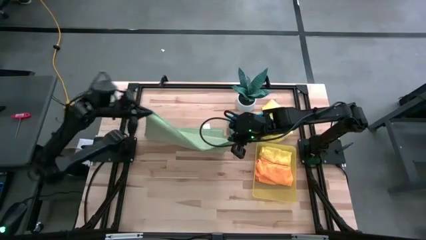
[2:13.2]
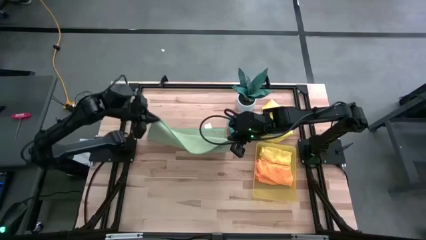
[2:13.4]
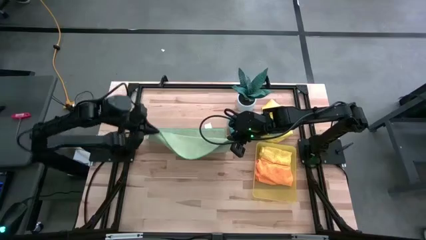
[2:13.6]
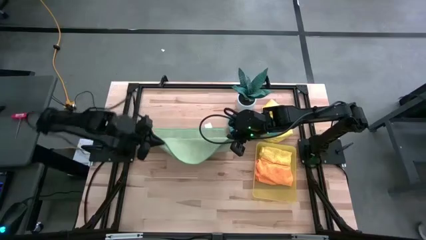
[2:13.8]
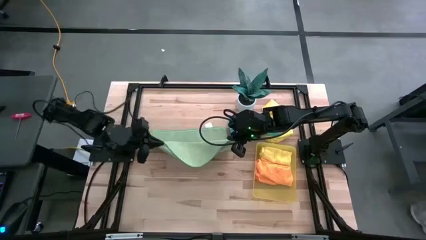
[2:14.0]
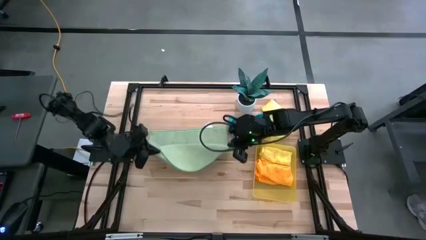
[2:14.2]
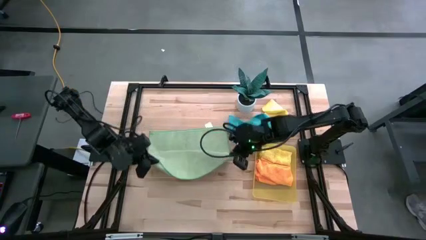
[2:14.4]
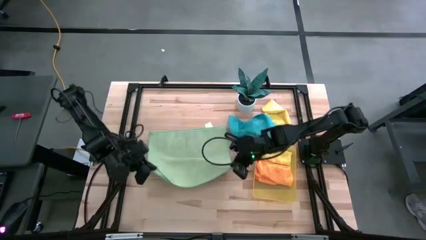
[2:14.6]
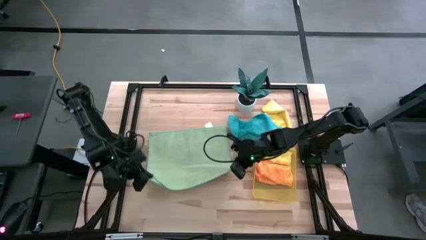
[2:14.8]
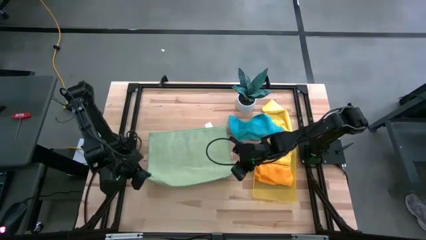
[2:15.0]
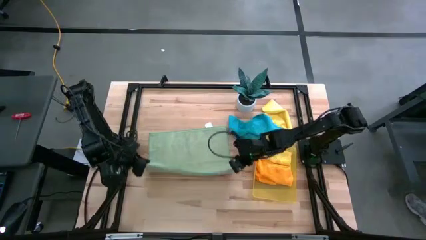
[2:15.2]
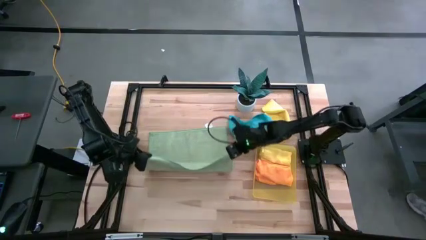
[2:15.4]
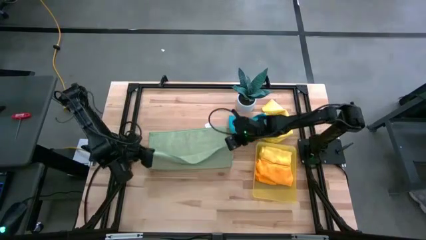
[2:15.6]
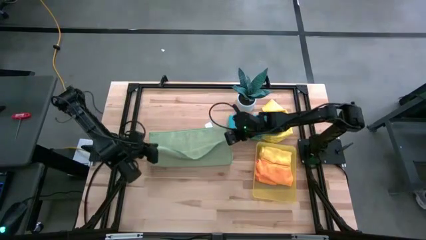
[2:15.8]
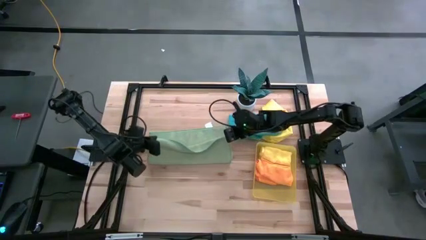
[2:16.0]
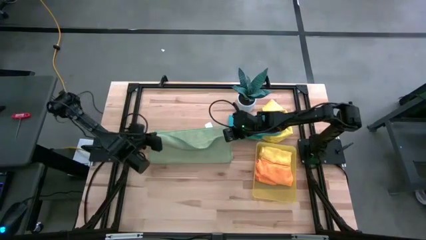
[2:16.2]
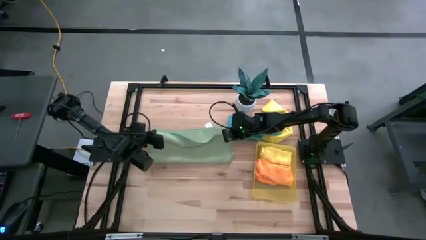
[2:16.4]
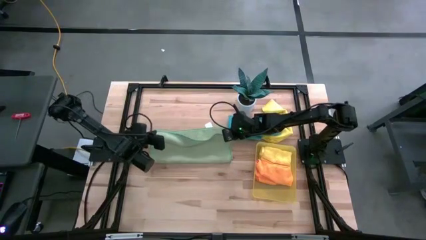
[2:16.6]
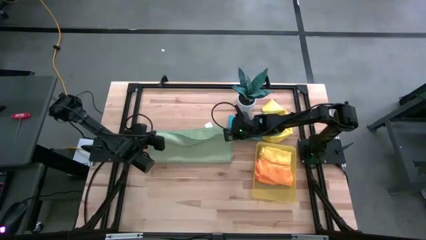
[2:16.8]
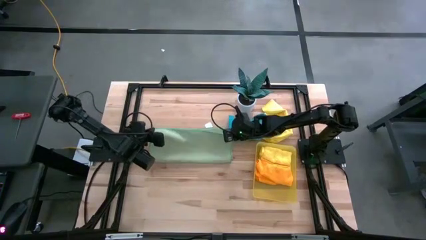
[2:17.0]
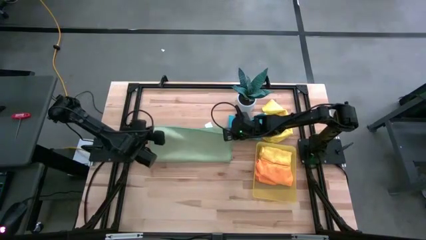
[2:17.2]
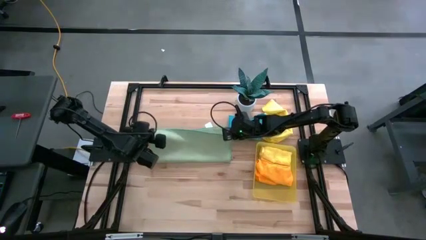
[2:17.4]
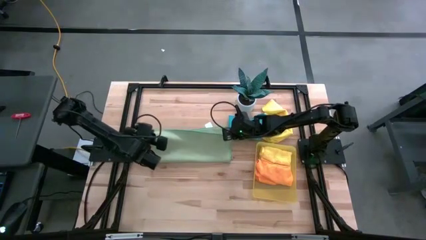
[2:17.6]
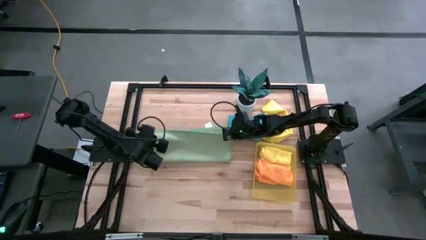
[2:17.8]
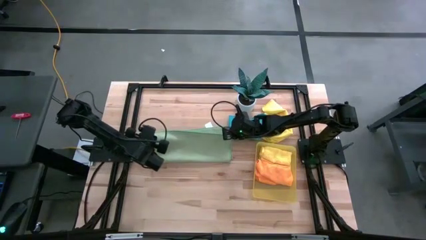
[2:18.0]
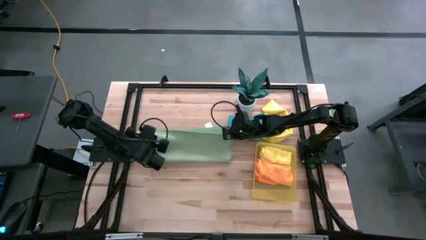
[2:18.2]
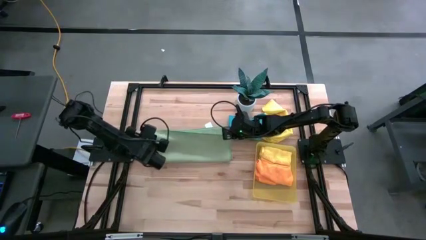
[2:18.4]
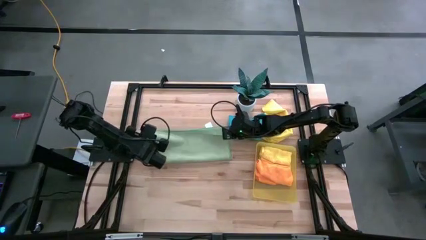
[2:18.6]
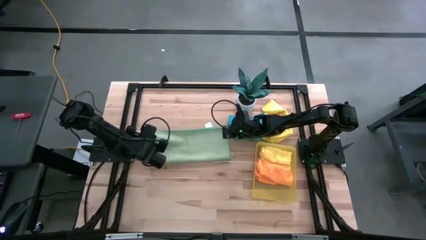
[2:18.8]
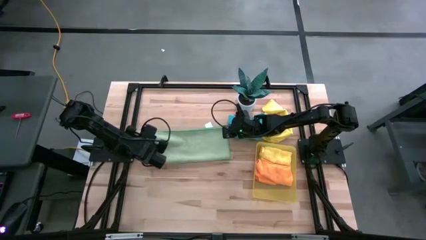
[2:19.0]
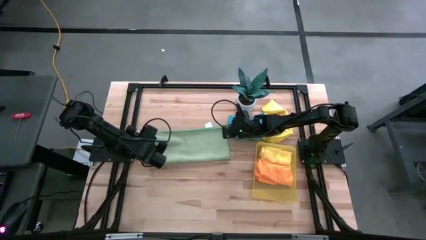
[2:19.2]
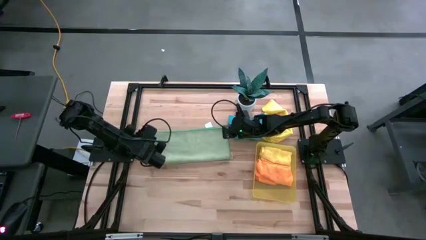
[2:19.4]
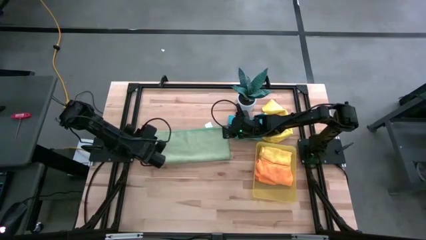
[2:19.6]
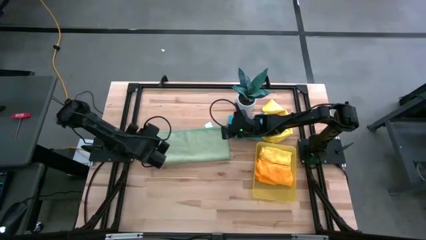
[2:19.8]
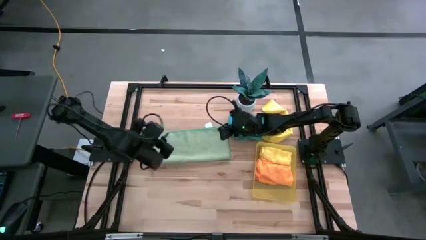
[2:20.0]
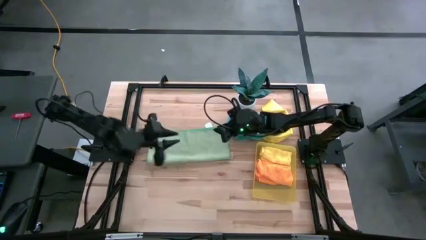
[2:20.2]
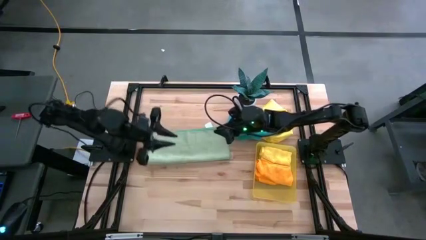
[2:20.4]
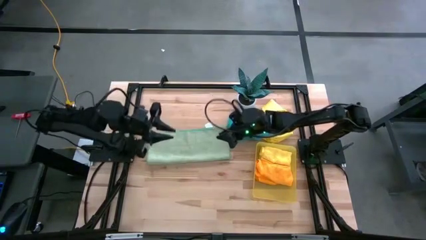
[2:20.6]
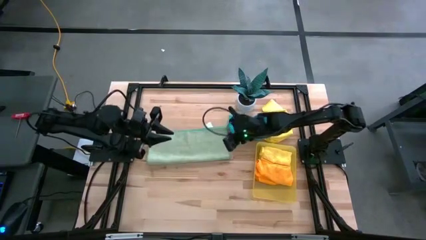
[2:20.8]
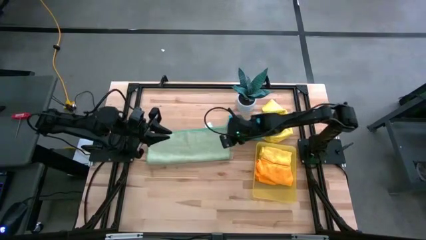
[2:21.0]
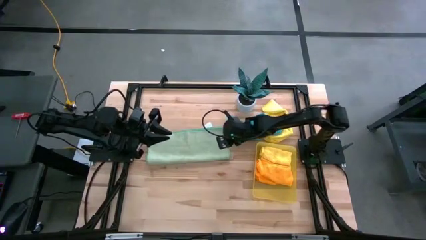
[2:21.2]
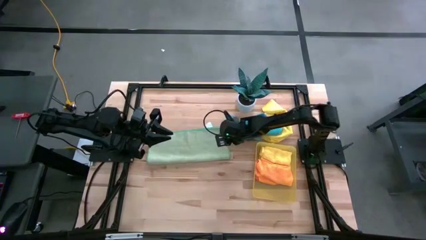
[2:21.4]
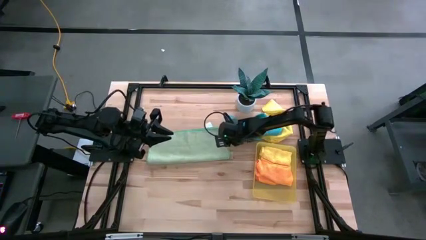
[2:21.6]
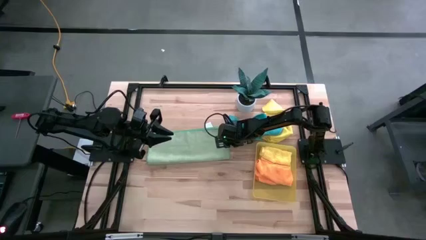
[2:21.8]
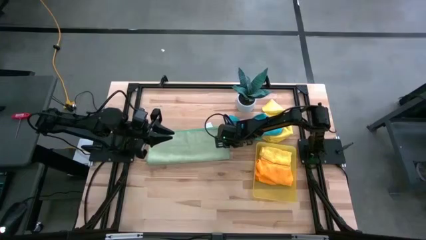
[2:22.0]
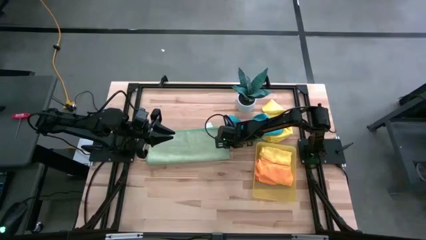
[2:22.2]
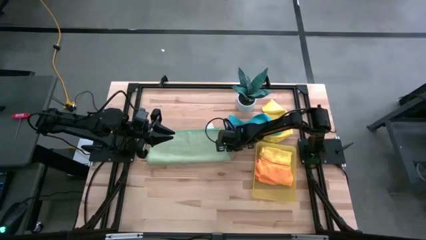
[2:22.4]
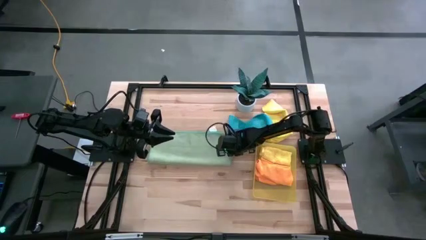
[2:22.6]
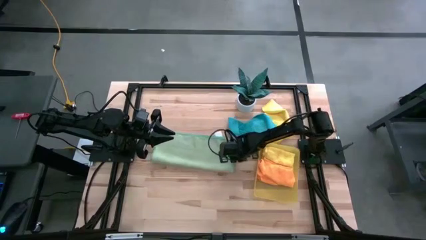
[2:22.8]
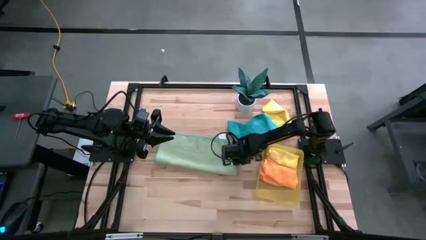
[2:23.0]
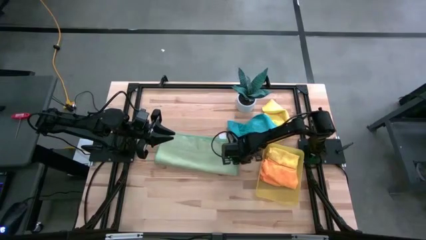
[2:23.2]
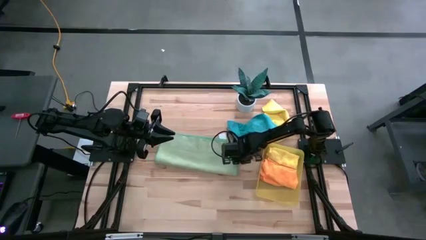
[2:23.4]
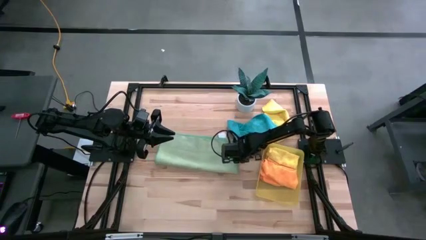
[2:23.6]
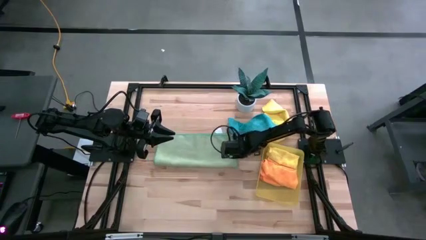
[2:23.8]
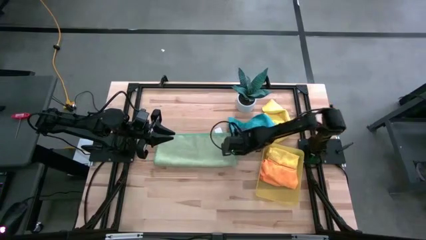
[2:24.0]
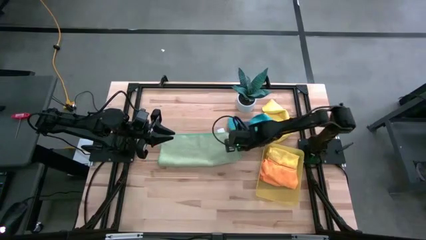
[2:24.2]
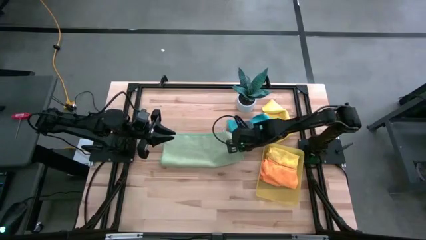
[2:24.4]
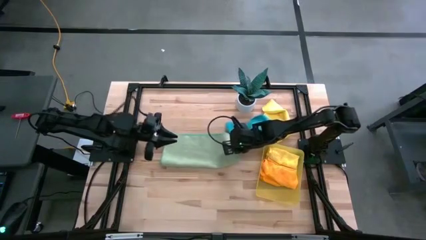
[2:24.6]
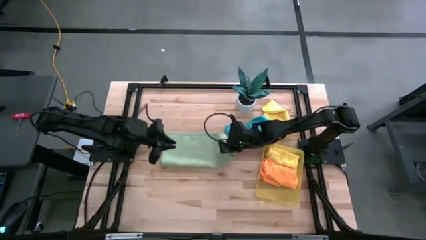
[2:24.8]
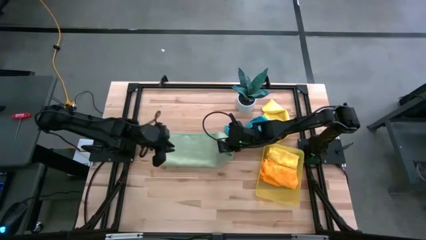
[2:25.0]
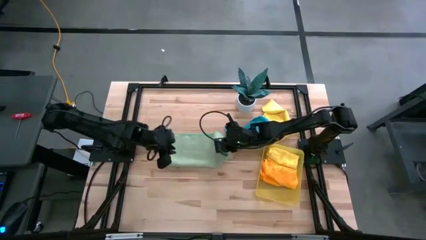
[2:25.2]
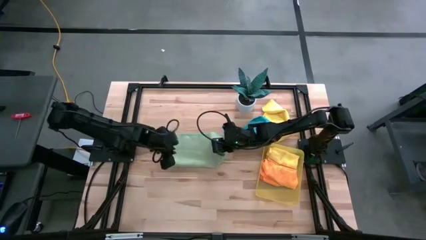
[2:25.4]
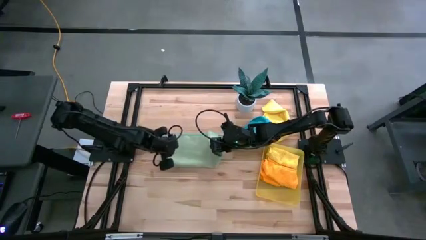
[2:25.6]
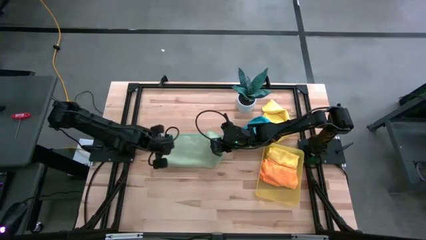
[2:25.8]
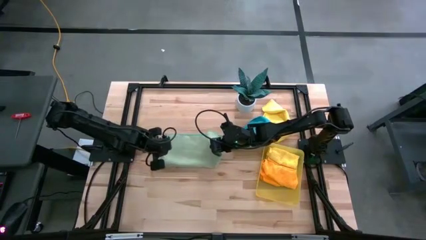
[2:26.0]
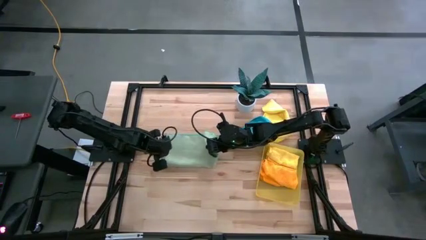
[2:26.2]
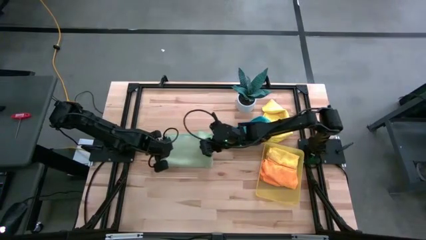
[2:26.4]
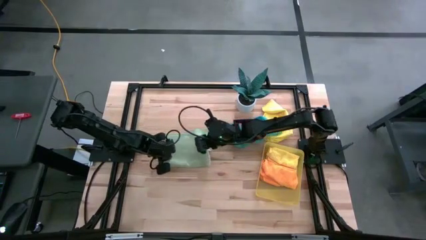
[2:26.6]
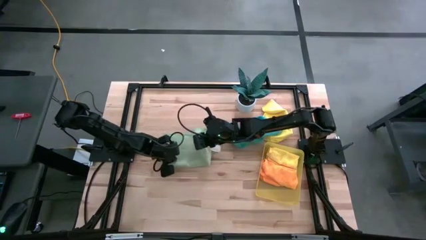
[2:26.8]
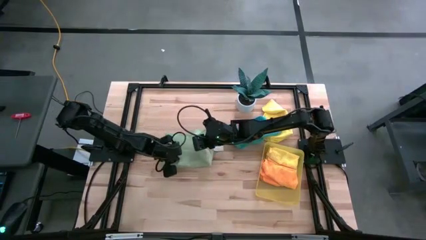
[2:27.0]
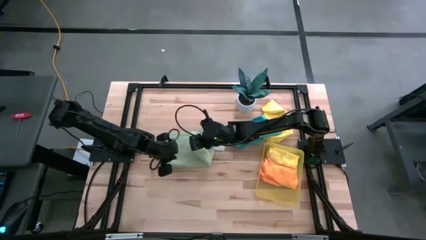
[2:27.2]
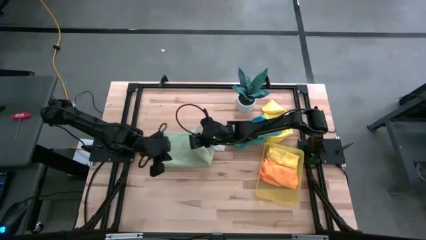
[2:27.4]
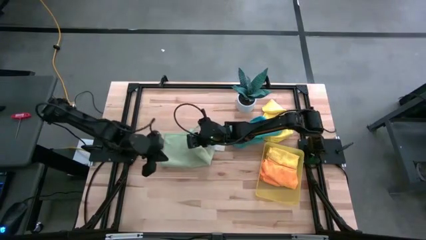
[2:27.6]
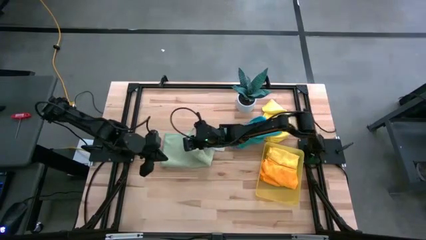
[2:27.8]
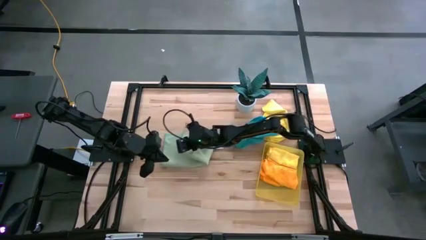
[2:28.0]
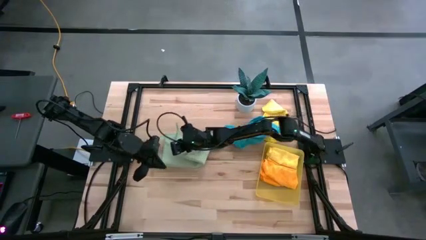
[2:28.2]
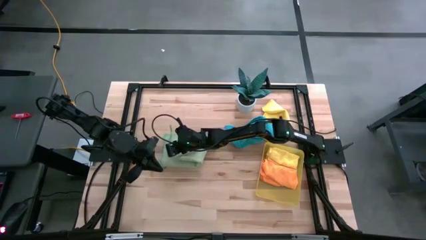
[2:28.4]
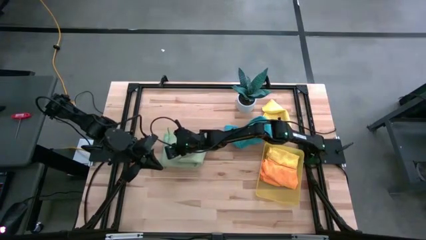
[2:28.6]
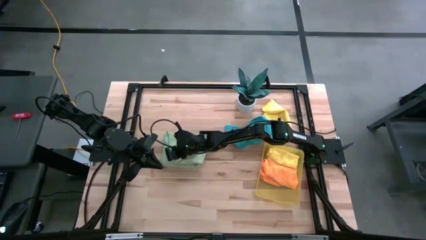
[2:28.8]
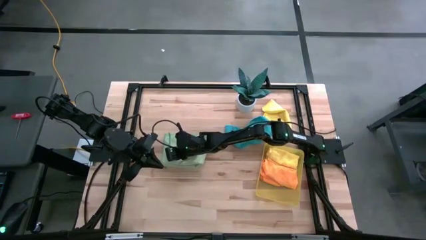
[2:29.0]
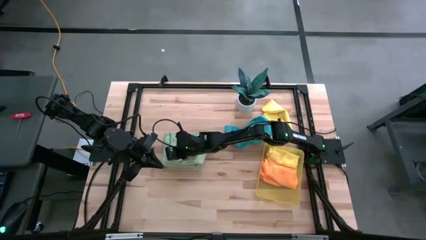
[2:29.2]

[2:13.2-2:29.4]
Task: Fold microfiber towels
Fold the light green microfiber cloth
